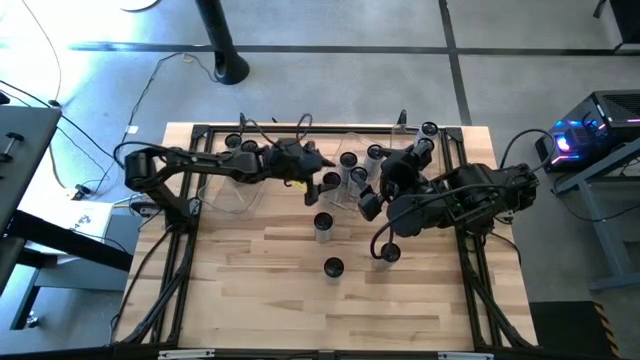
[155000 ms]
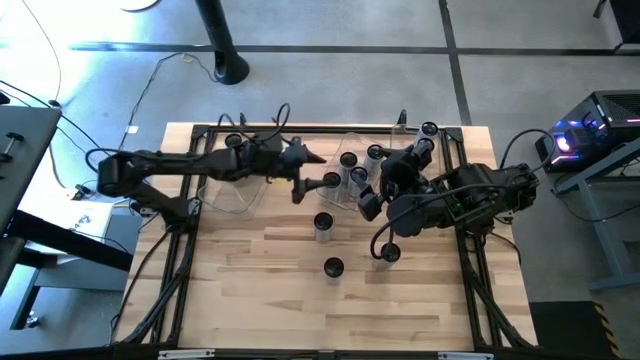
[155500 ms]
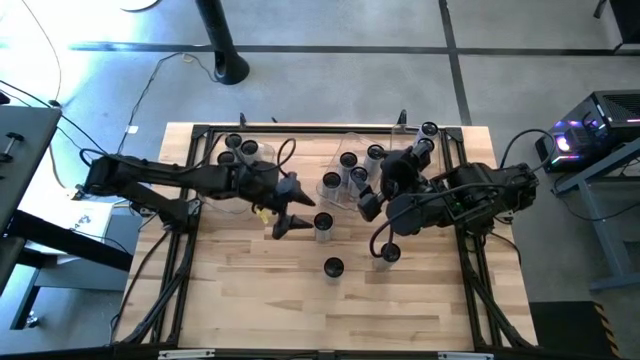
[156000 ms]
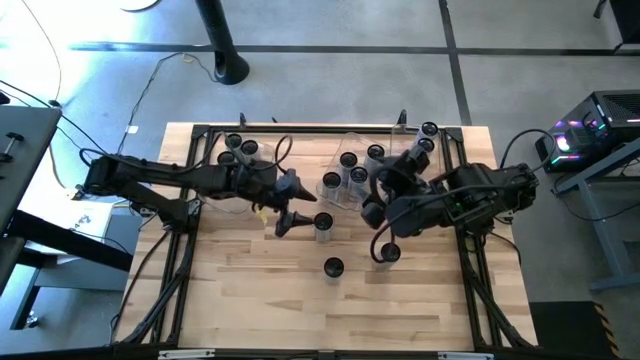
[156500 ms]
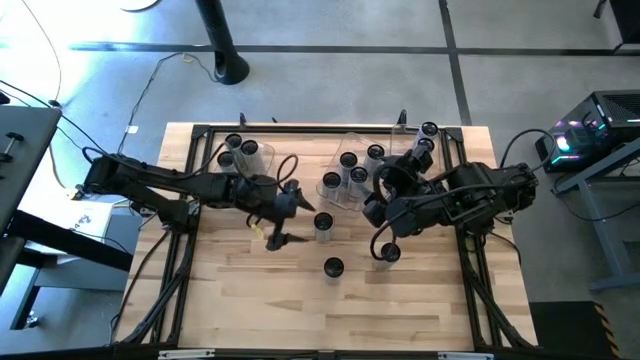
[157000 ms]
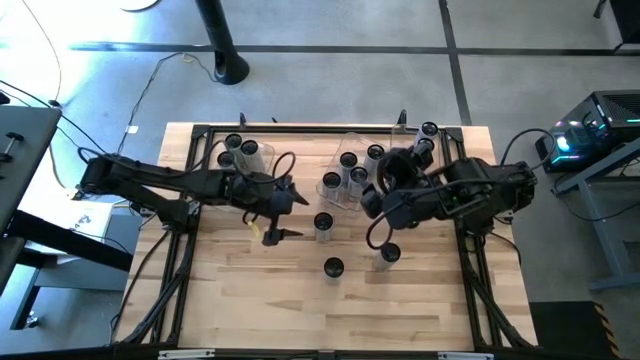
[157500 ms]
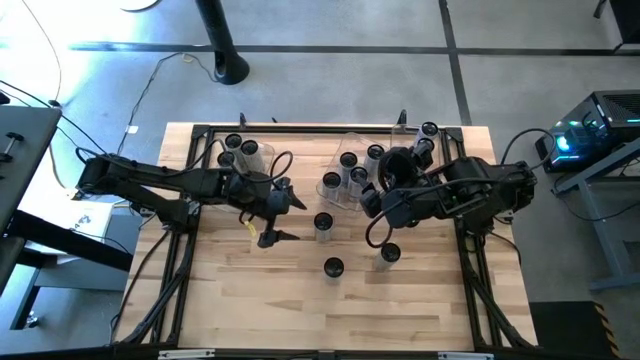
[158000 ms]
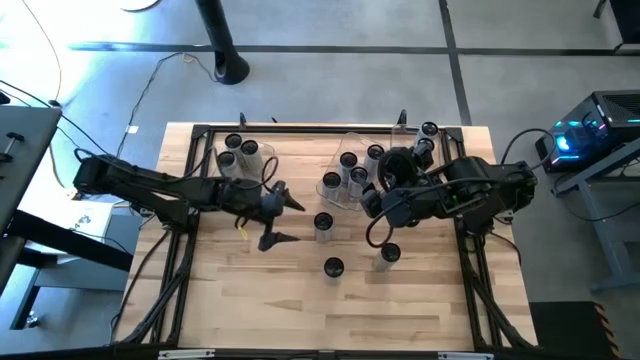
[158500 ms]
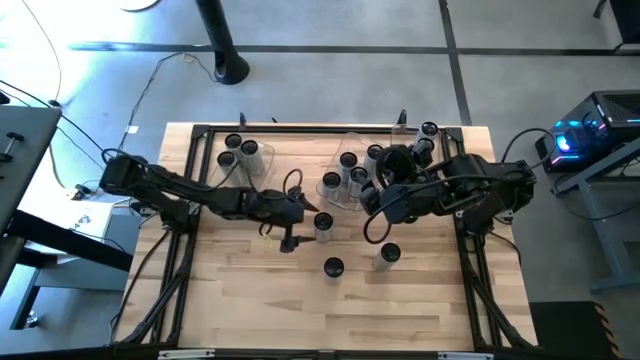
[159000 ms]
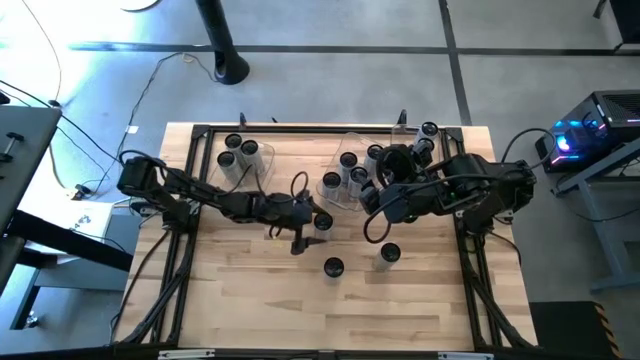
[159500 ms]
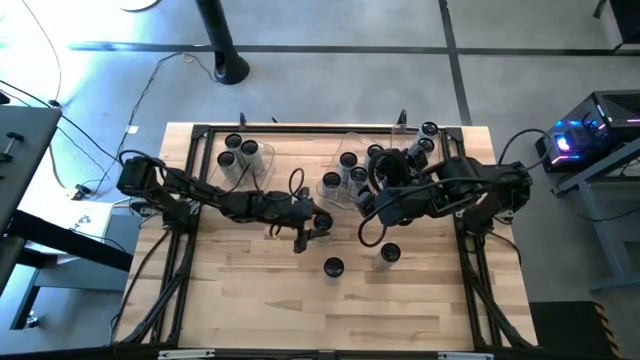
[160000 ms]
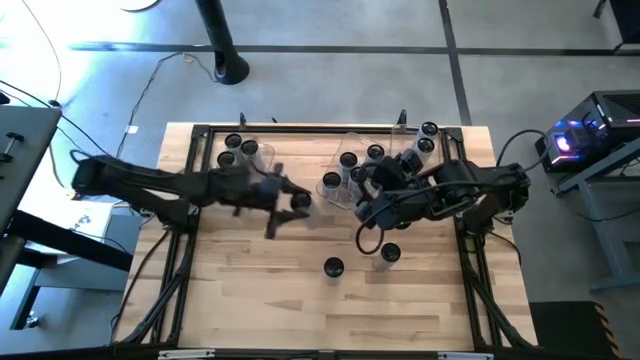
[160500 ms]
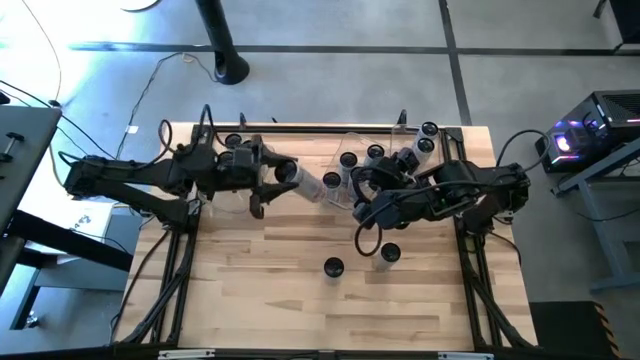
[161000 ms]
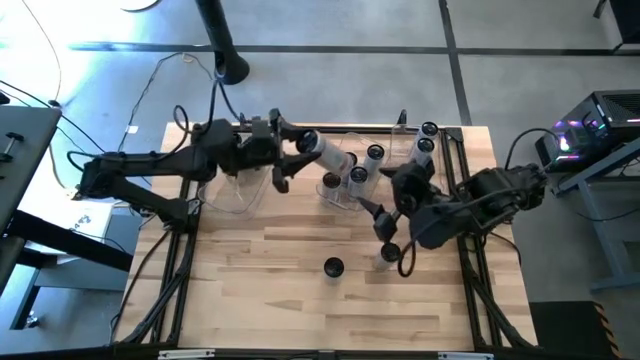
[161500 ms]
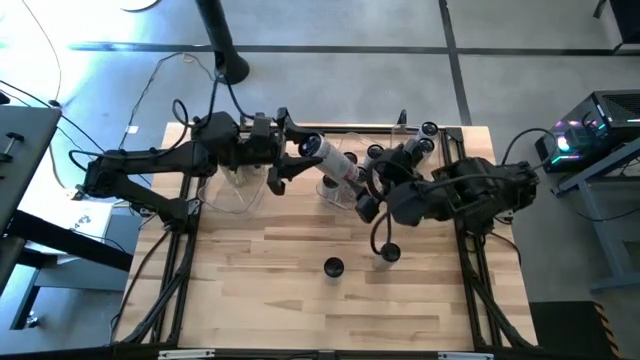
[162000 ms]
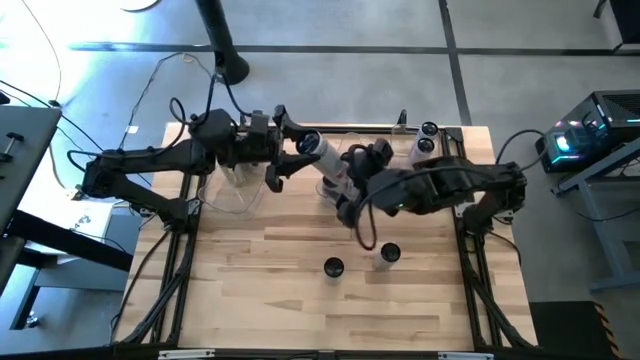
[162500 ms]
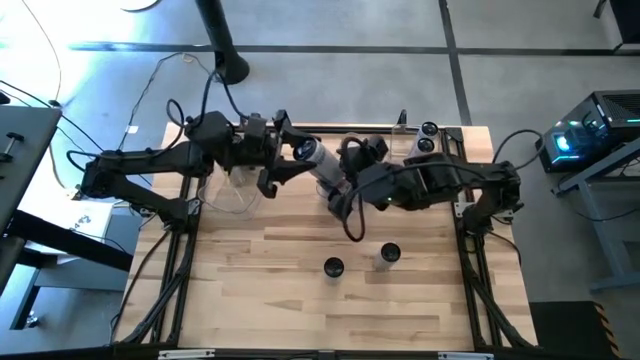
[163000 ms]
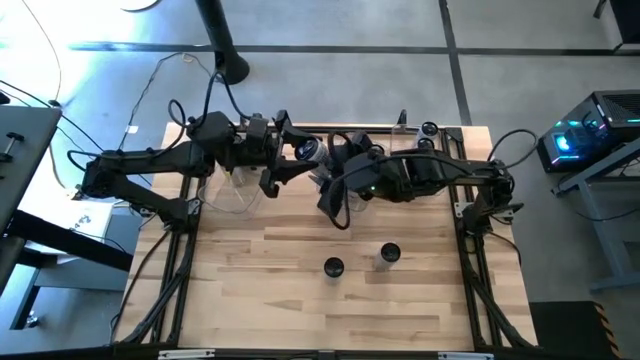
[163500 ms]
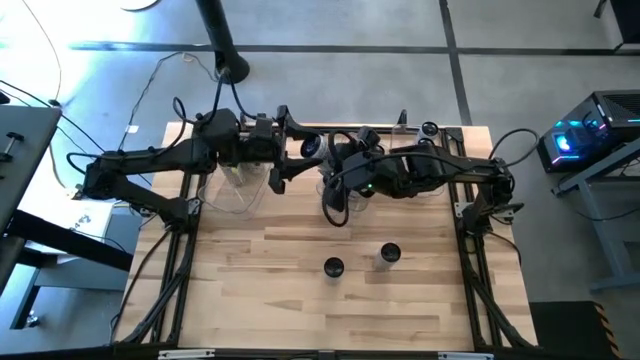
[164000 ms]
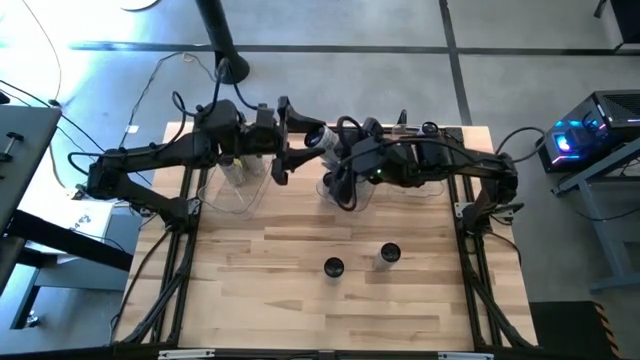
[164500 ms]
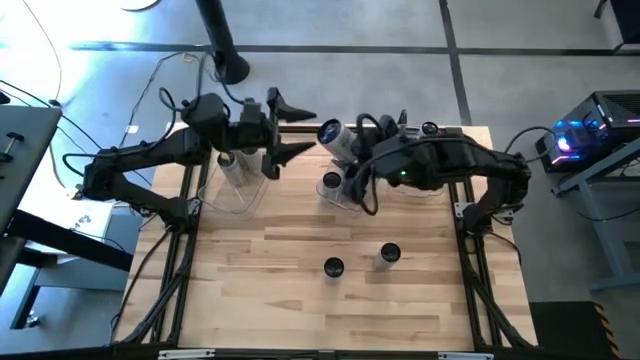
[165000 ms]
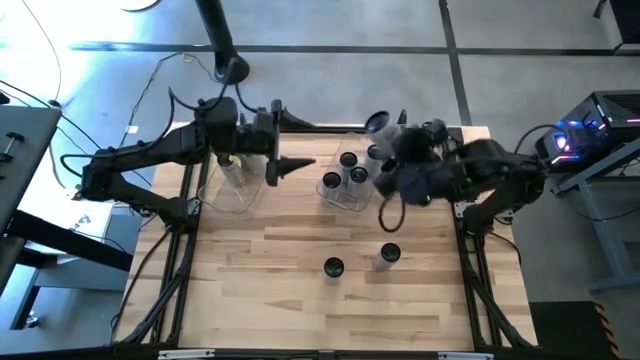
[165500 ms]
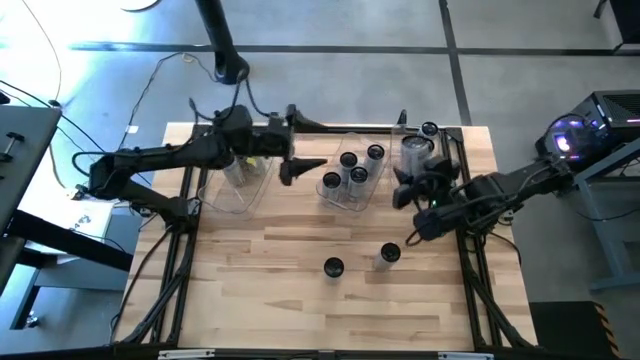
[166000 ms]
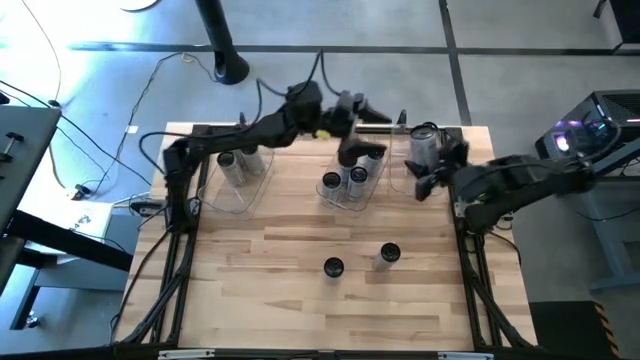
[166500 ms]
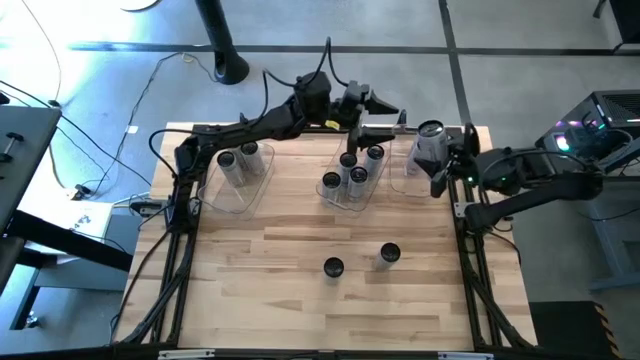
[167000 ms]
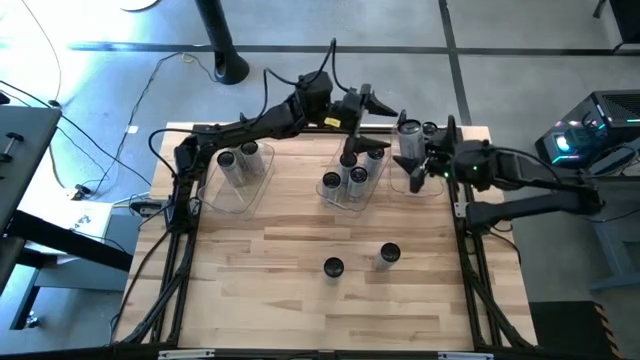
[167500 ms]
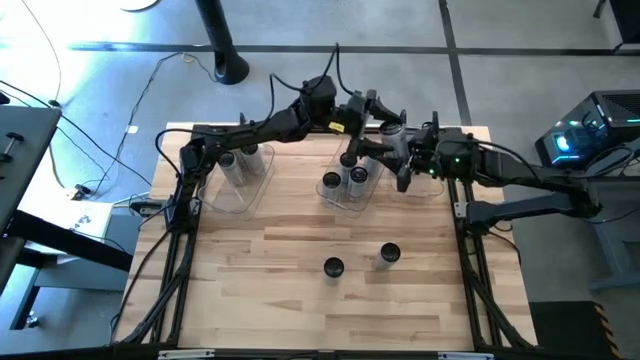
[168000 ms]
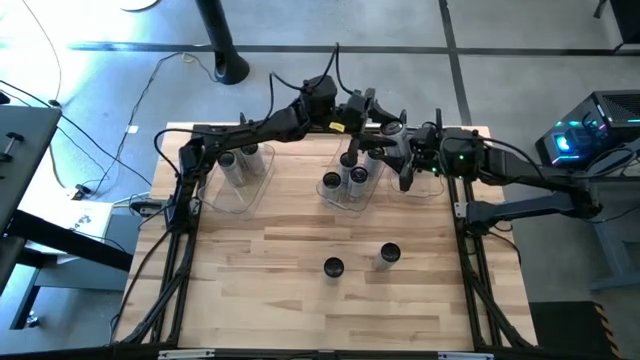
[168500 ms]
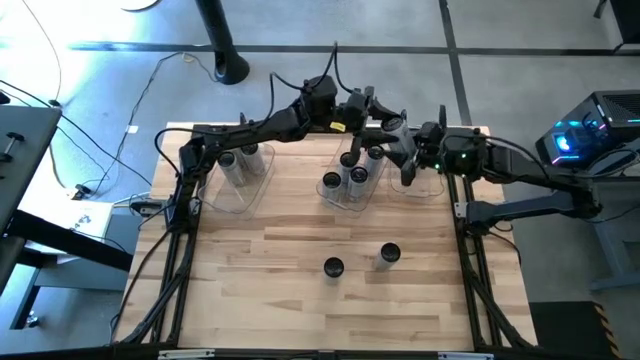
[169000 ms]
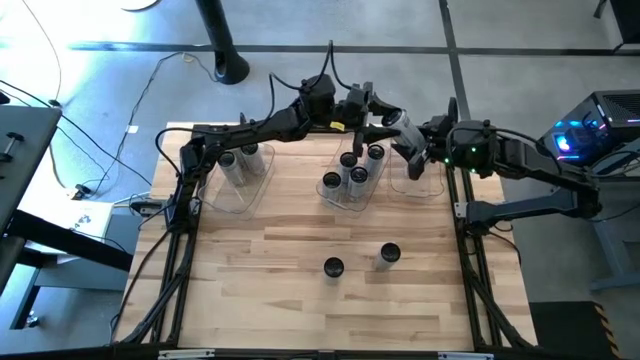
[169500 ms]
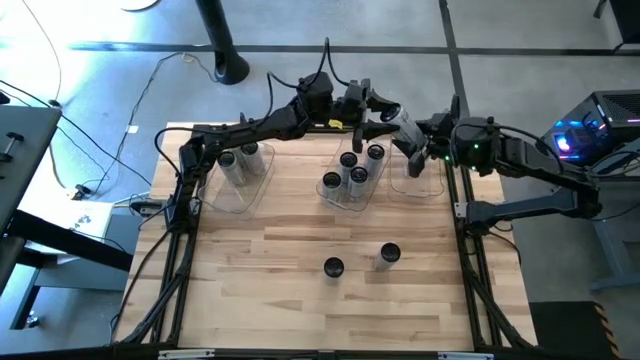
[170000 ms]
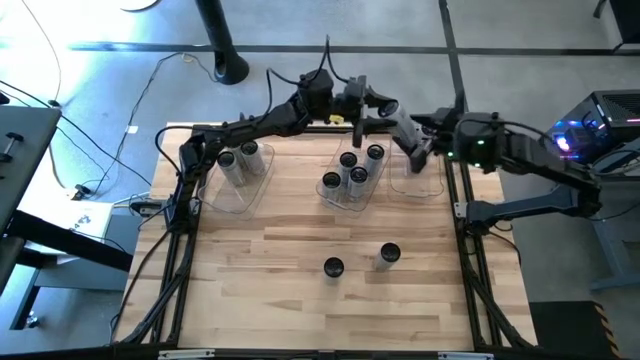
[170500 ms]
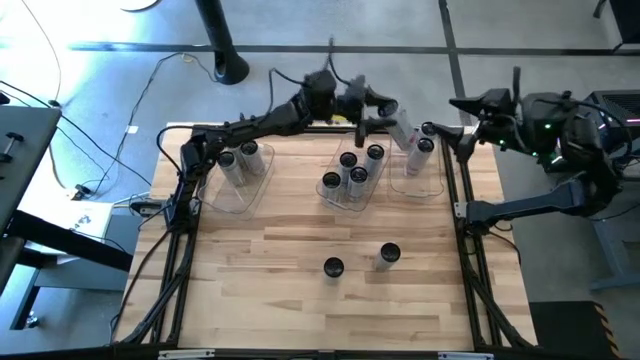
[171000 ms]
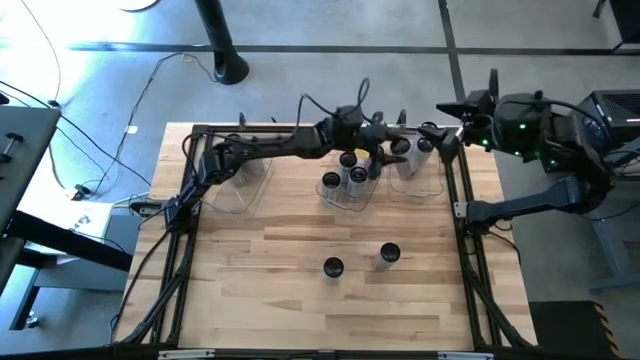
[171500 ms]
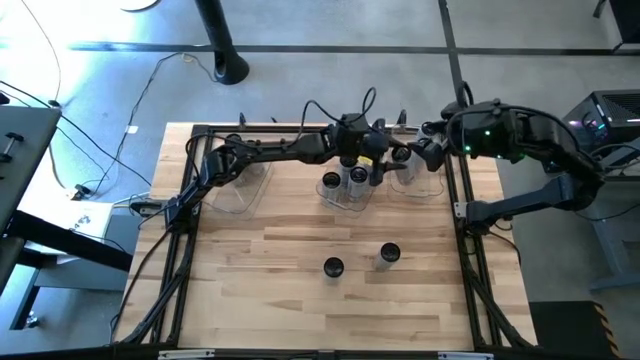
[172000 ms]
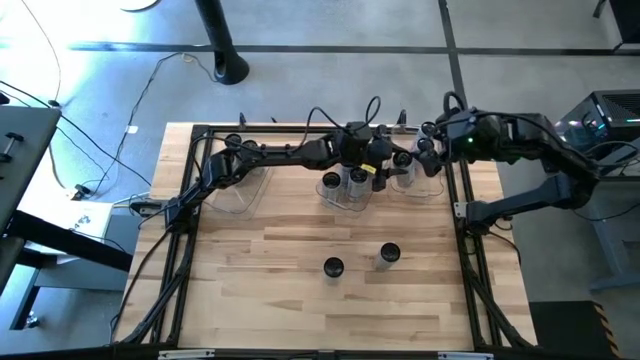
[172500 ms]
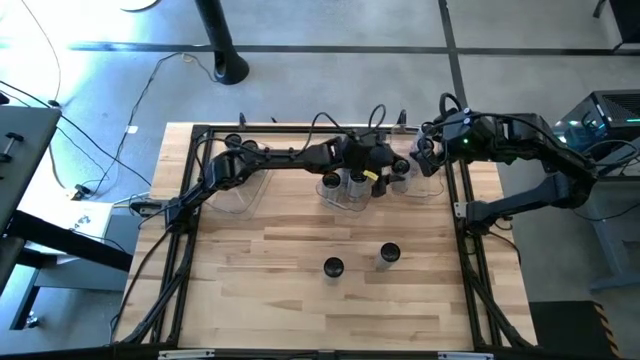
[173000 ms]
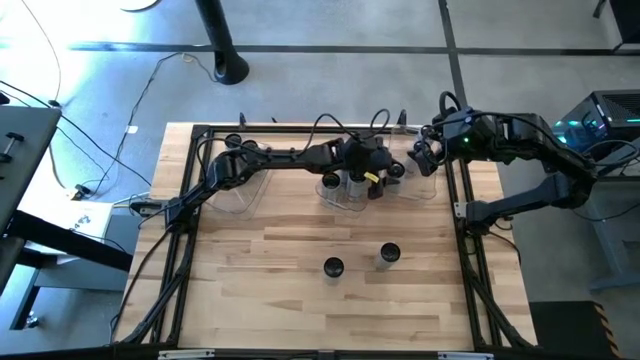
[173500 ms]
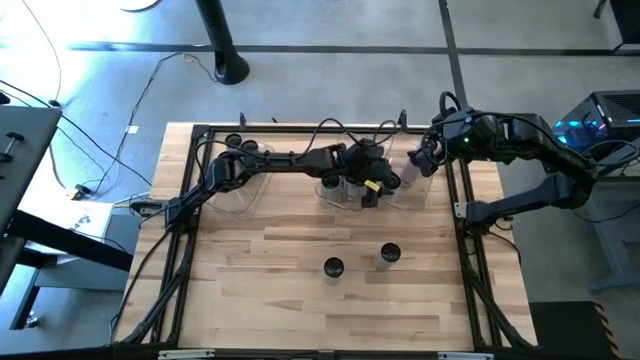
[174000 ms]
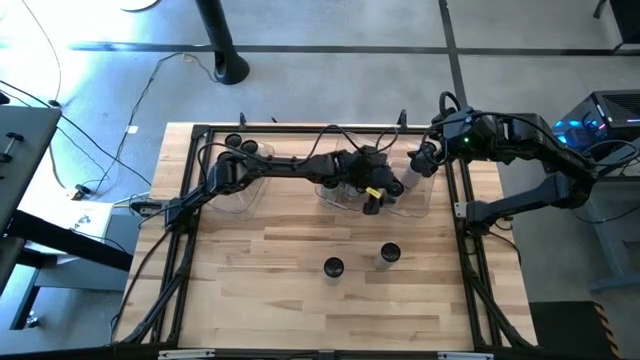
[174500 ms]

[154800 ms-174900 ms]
Task: Sort soda cans
Put the white-pink soda can into the top right transparent bin

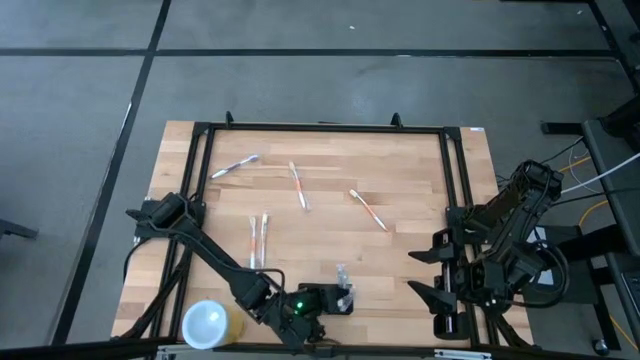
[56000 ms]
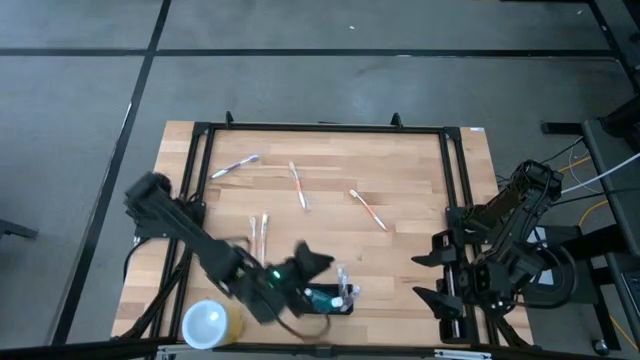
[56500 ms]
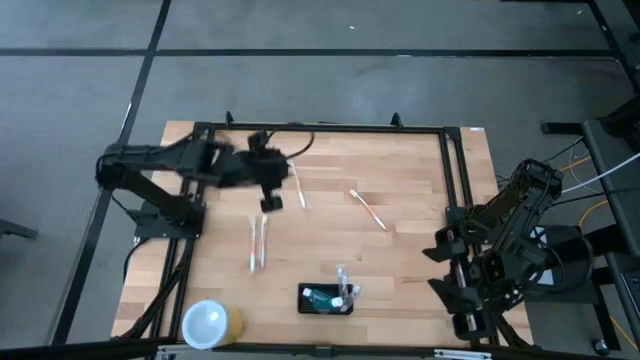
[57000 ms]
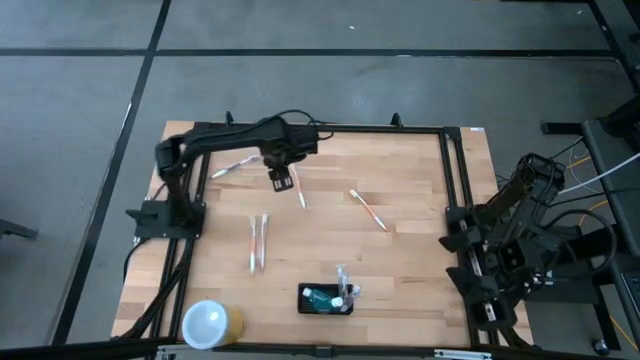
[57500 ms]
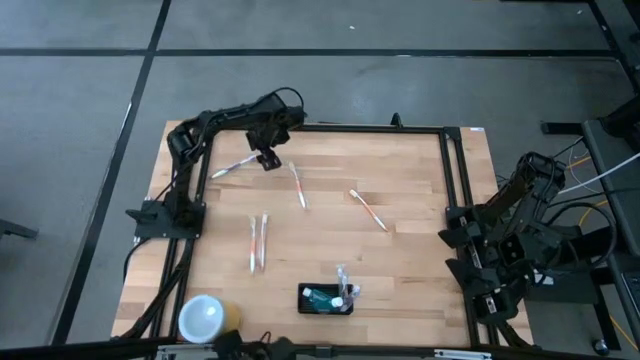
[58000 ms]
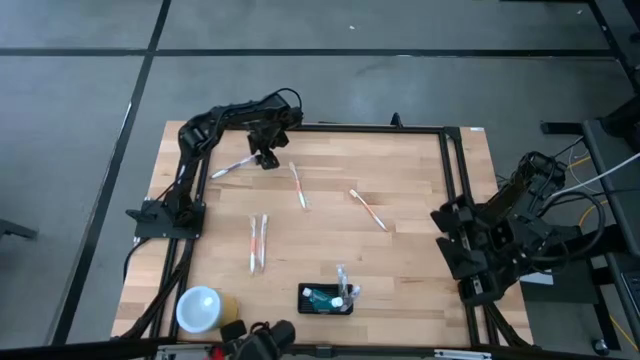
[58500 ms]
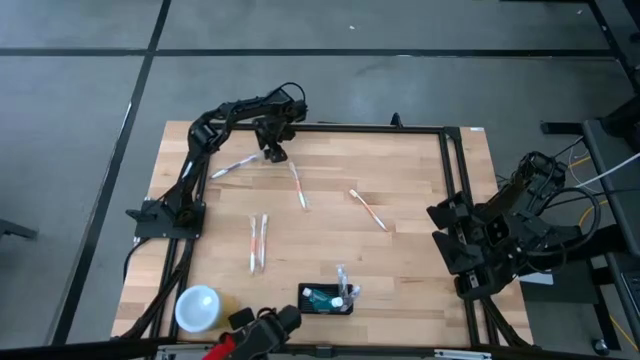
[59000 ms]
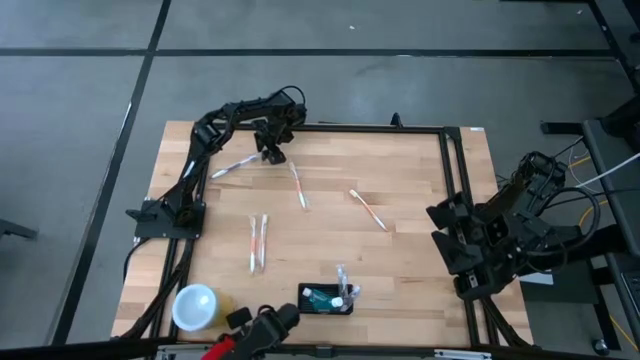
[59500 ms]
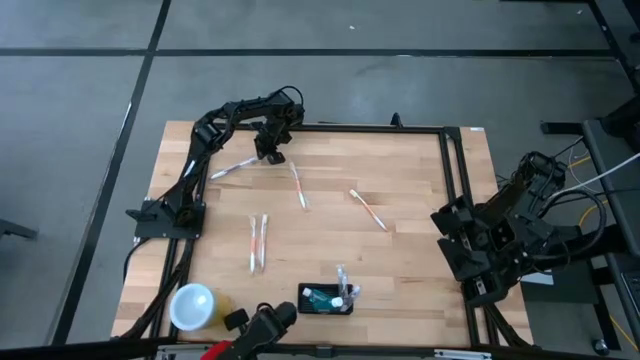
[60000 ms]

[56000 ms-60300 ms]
Task: Pick & Place toothbrushing station
Put the purple toothbrush into the mesh organizer
